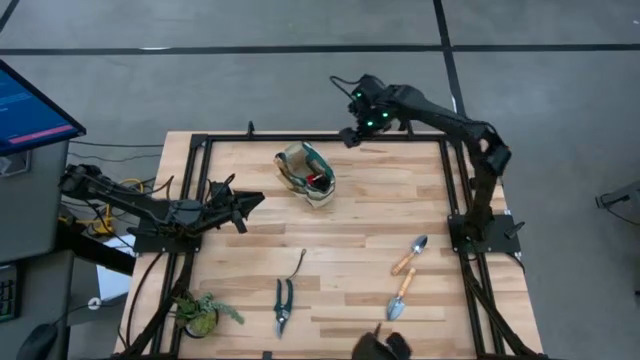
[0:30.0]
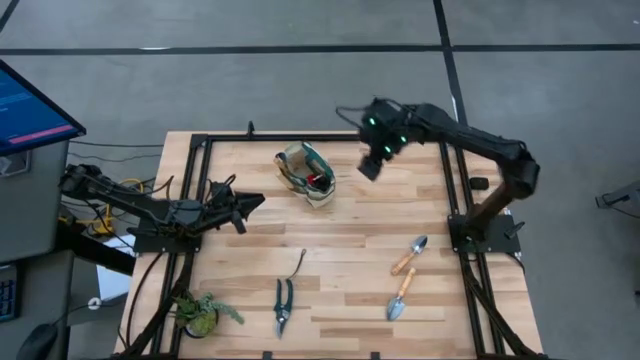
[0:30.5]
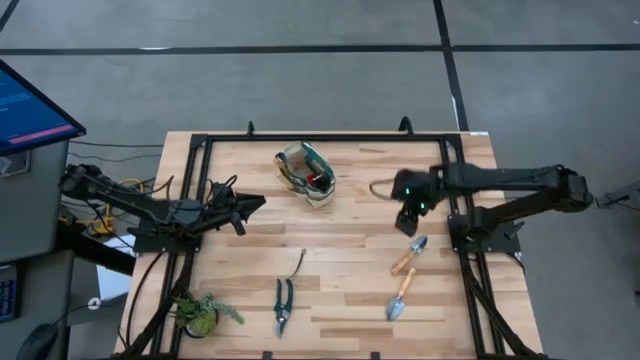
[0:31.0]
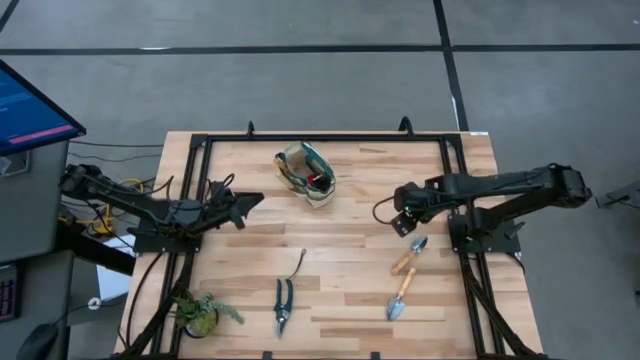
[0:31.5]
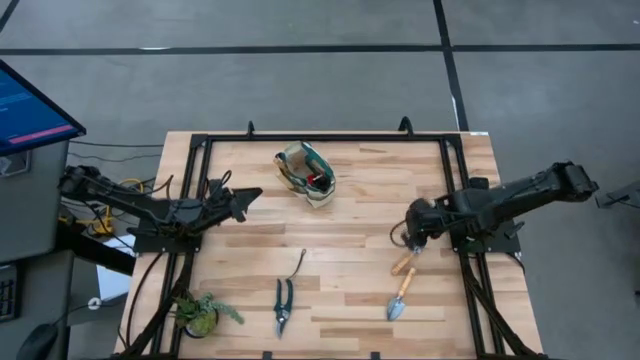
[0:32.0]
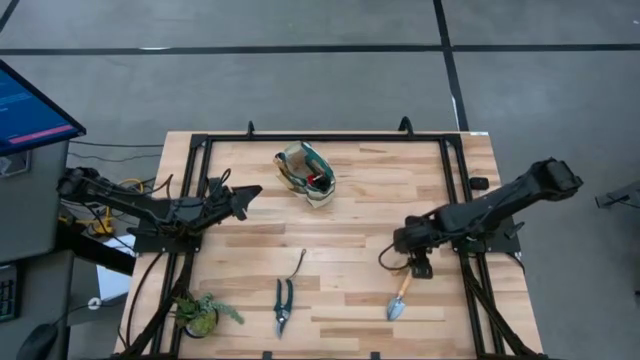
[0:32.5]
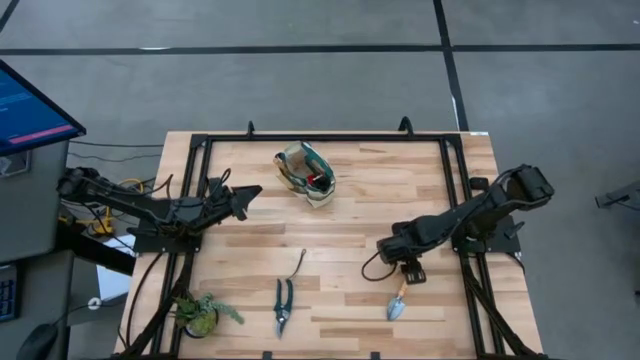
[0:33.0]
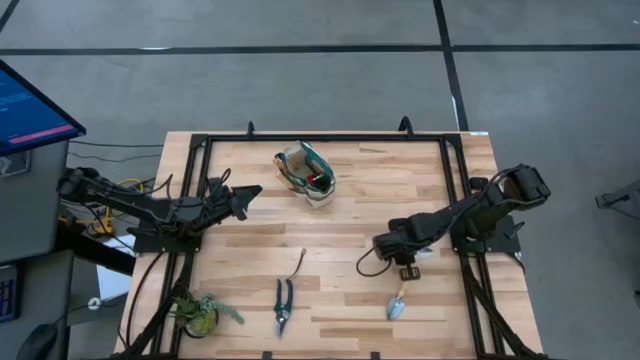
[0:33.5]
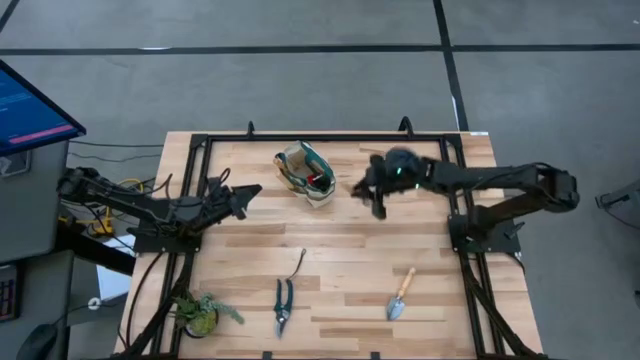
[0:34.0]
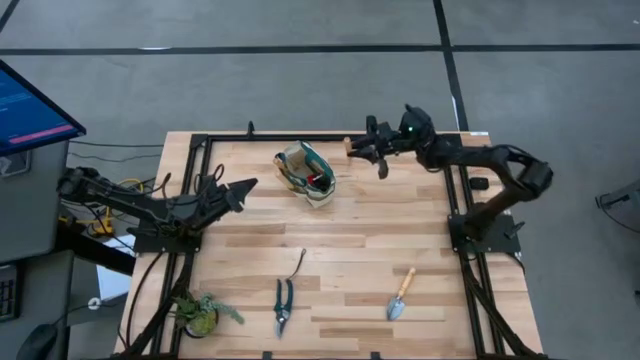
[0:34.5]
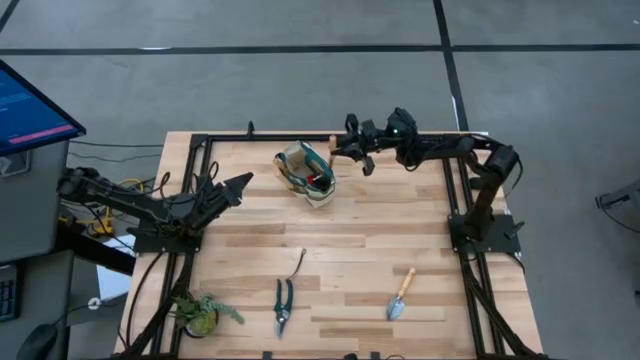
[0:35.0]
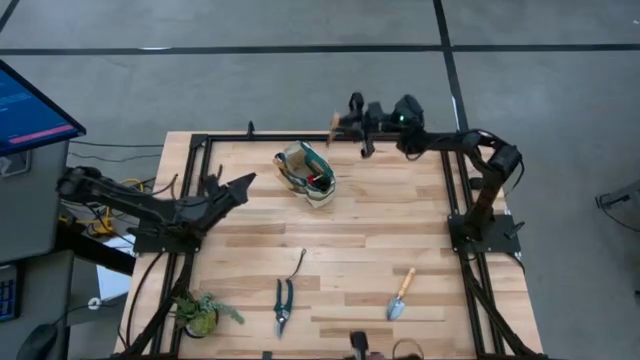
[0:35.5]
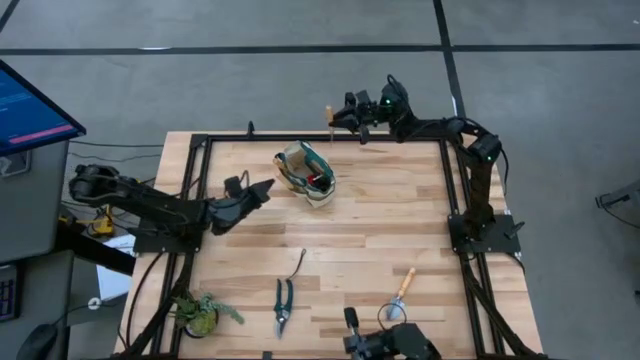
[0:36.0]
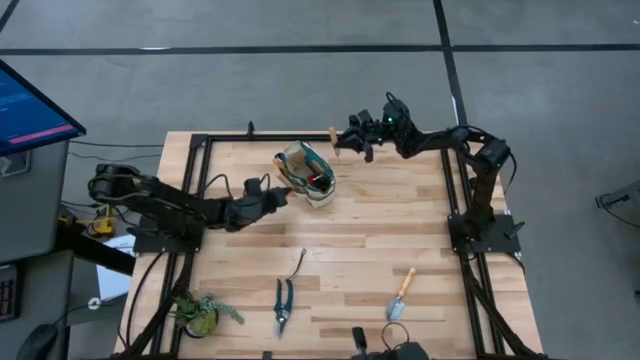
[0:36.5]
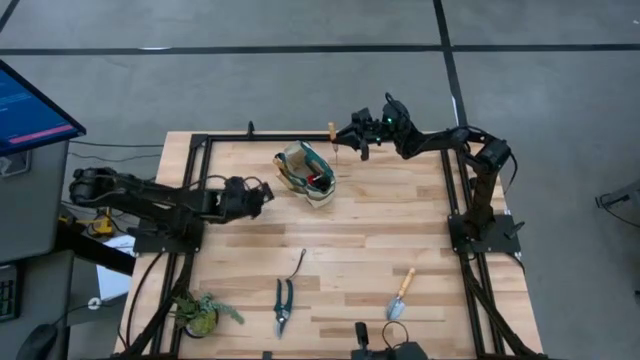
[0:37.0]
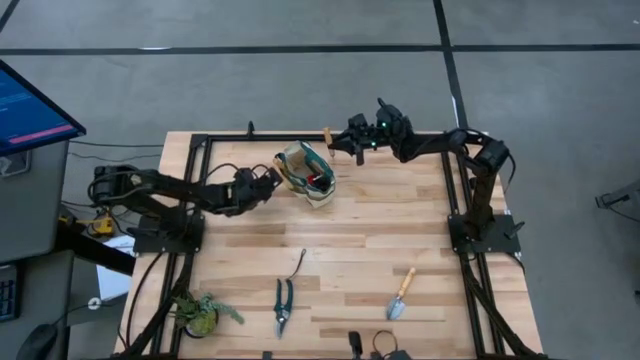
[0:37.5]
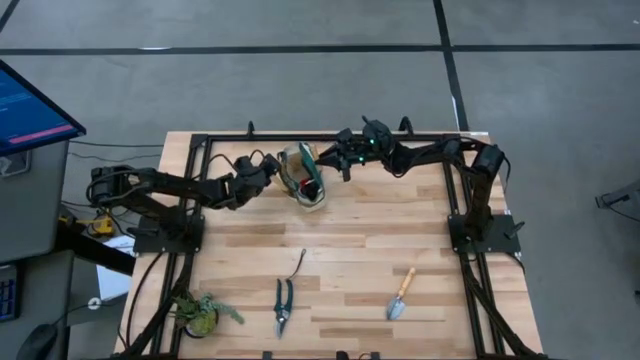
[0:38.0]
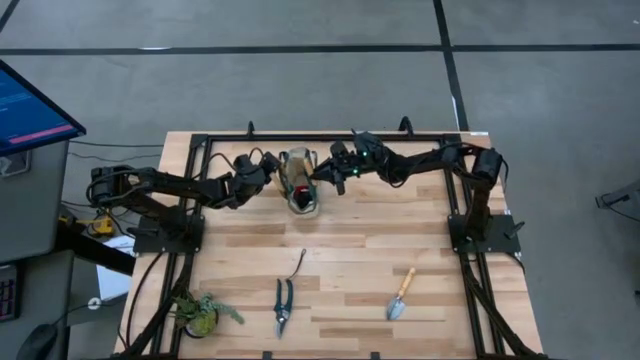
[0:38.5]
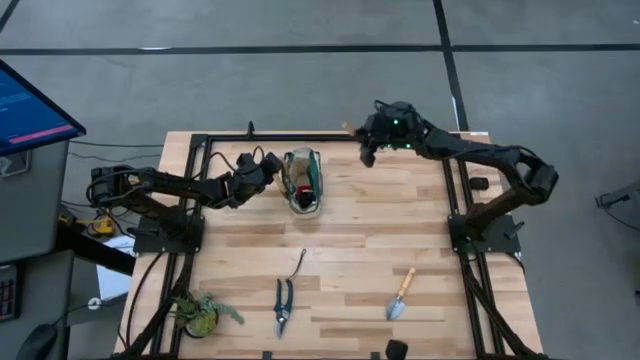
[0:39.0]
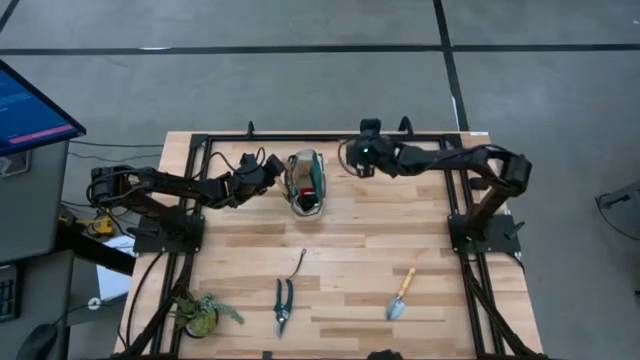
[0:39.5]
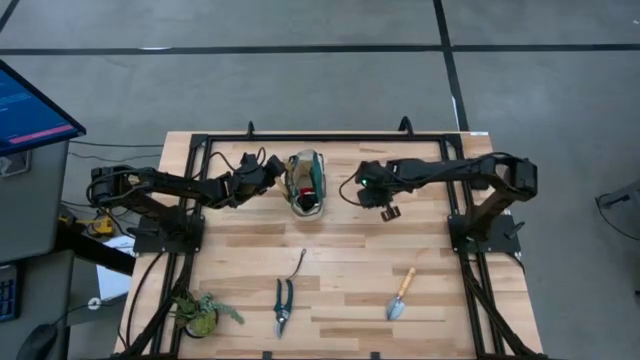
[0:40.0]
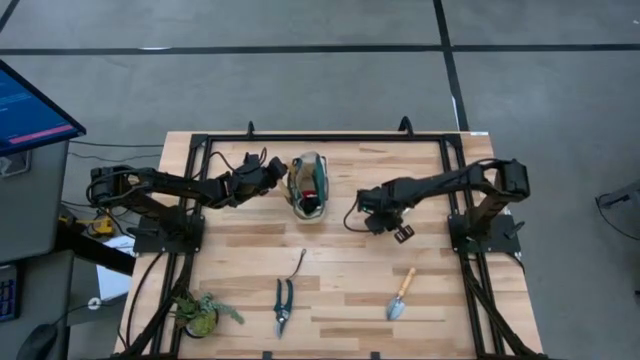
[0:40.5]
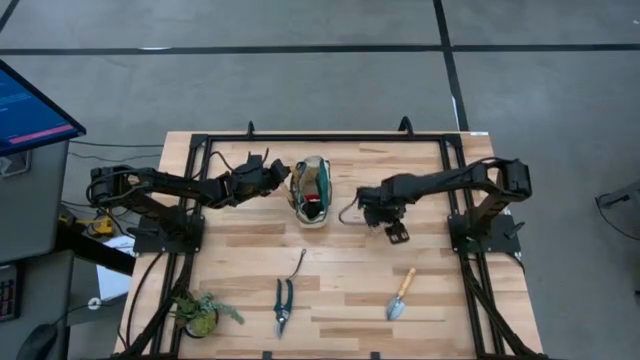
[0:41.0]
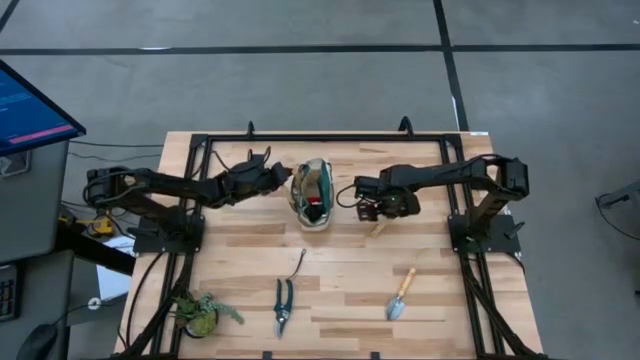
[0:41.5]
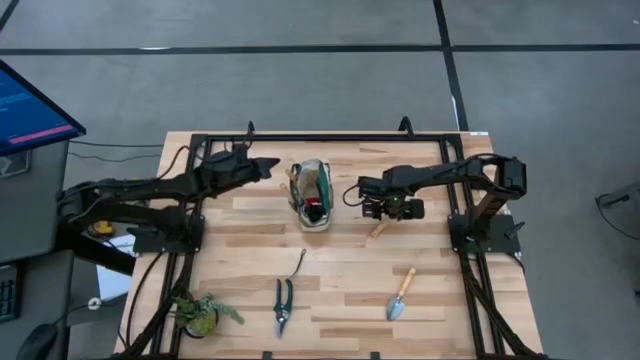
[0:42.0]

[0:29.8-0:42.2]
Task: Pick & Place Garden tools in Gardening bag
Put the top brown trowel into the white gardening bag

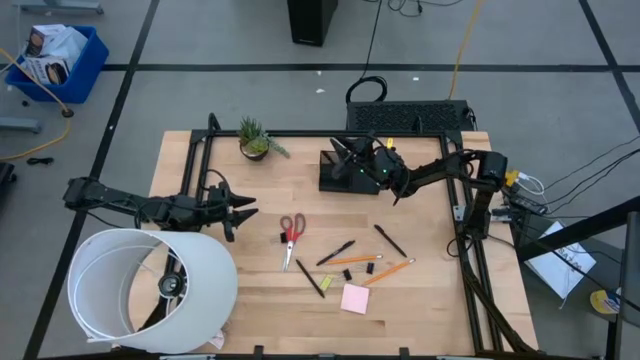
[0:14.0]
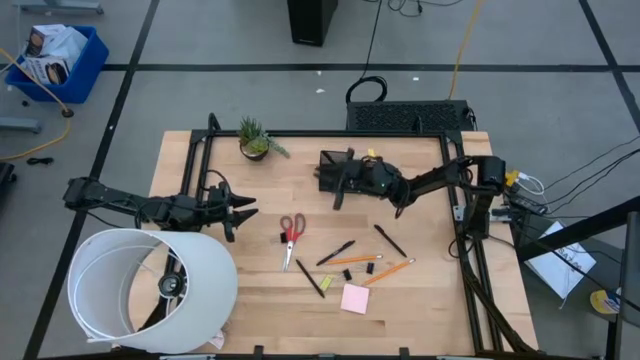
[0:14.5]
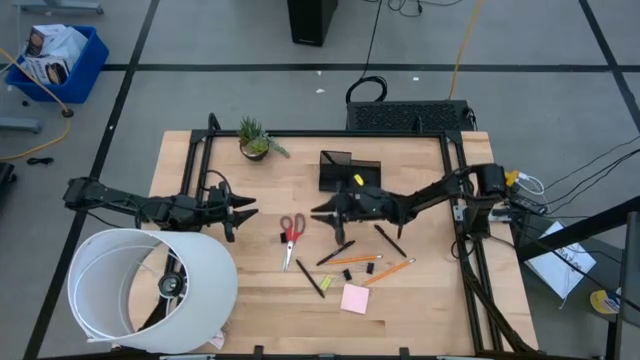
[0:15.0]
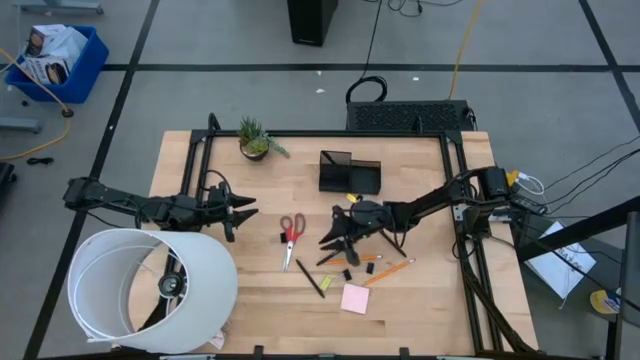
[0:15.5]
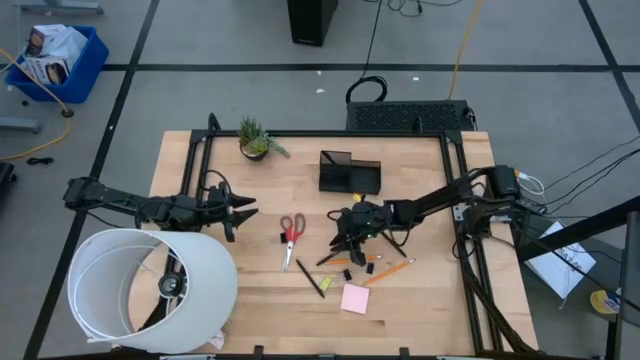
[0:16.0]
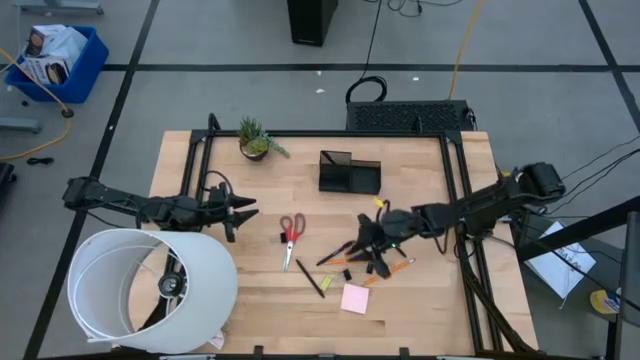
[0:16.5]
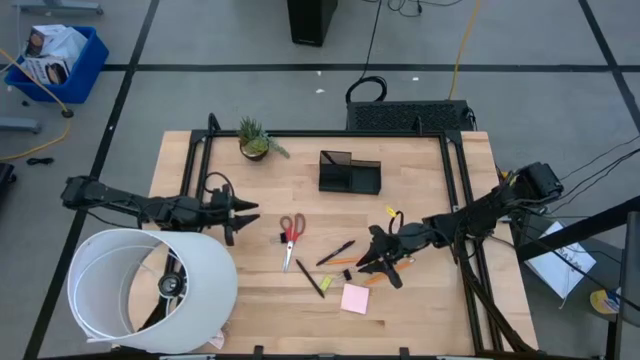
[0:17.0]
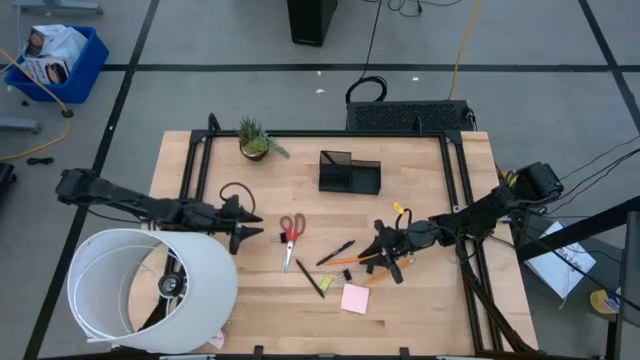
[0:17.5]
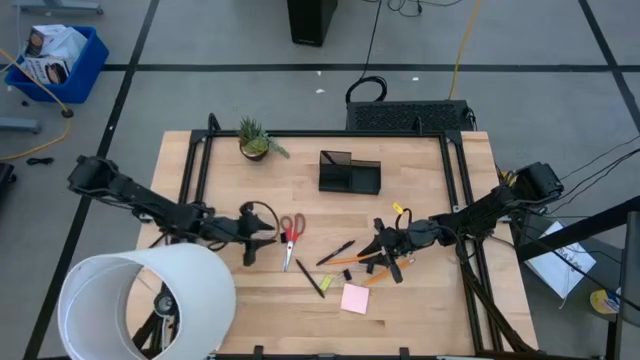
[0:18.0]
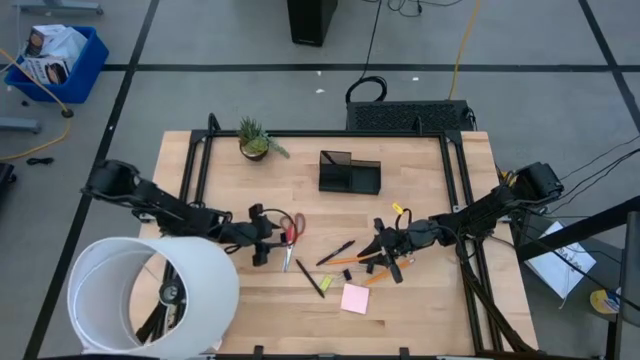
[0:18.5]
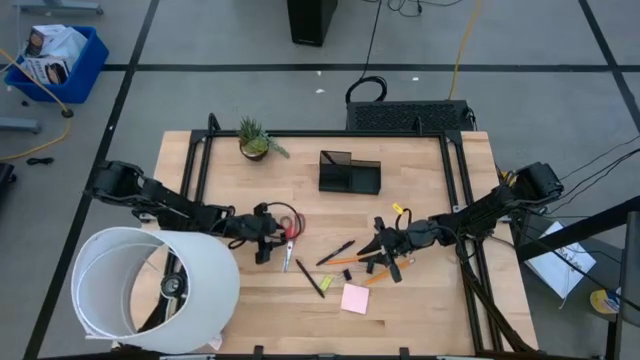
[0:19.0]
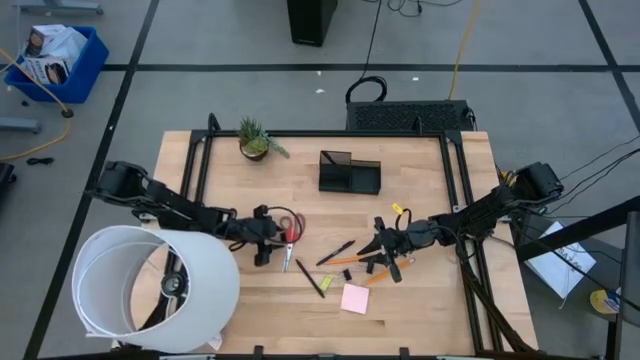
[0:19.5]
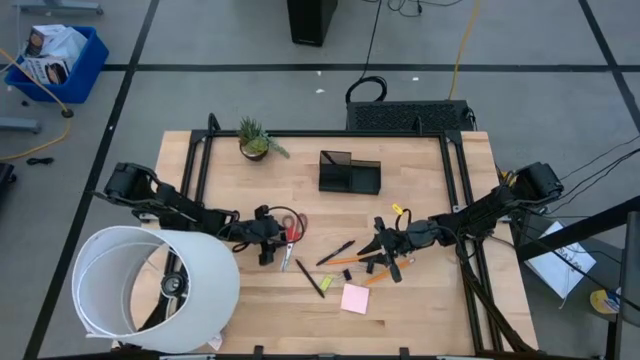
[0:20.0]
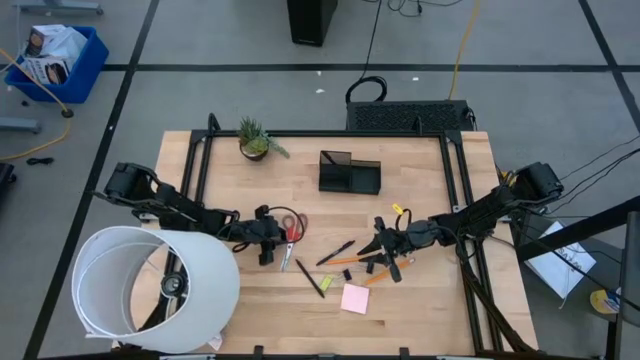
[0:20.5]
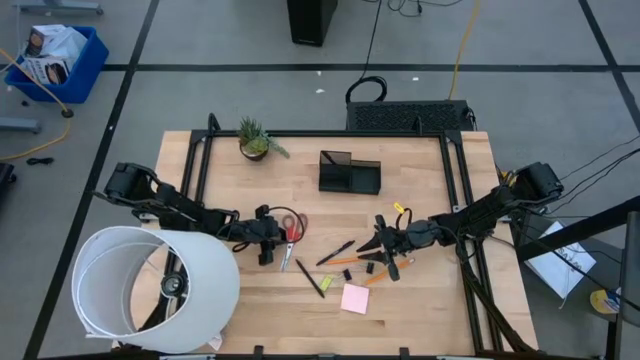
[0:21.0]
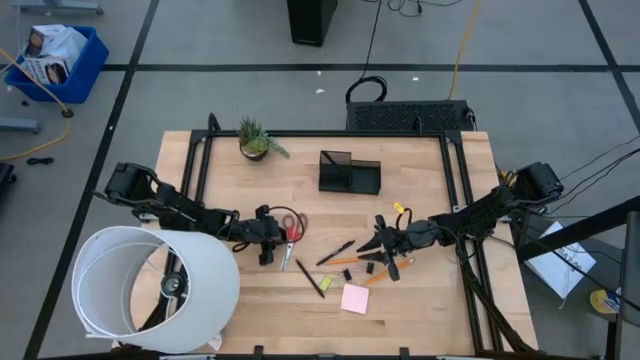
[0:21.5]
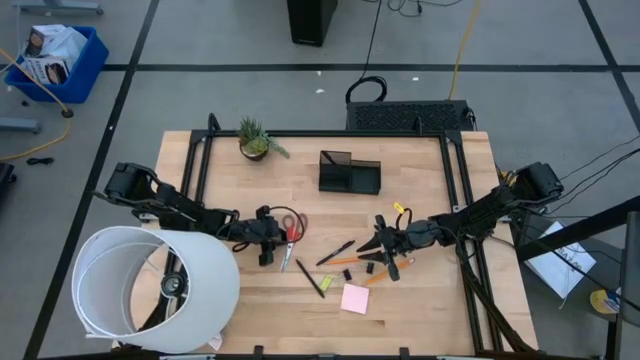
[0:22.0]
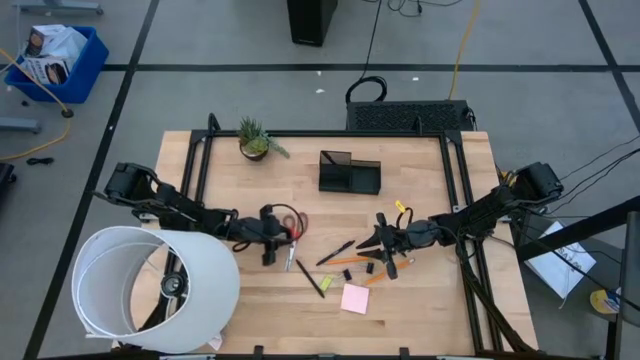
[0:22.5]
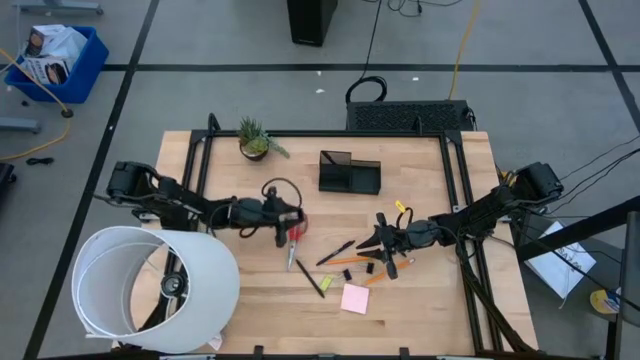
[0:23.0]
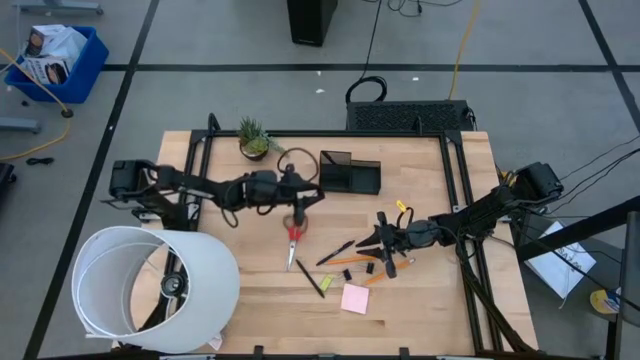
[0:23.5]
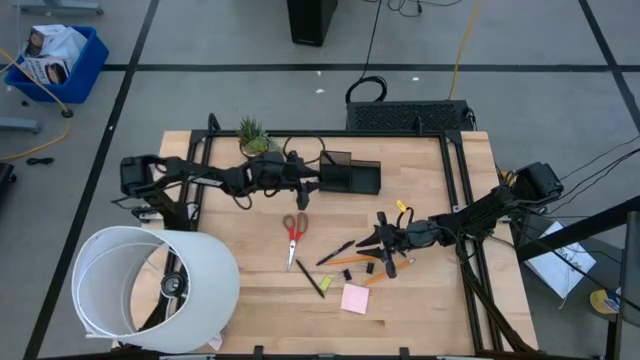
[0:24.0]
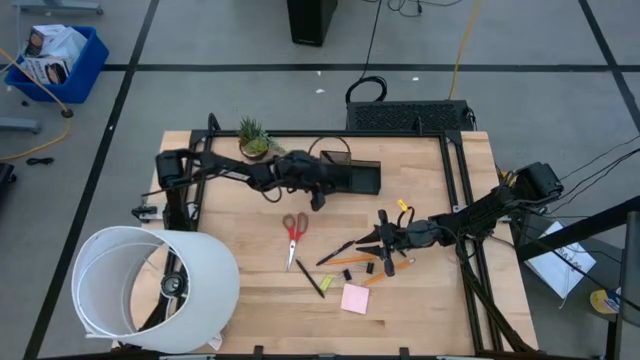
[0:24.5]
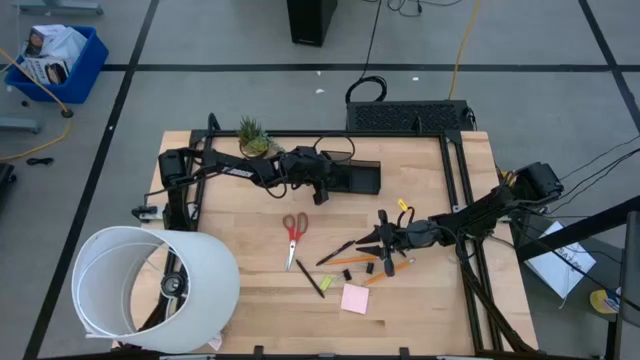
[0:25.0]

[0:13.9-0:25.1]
Task: Pick and place office supplies into organizer
Put the binder clip into the desk organizer
